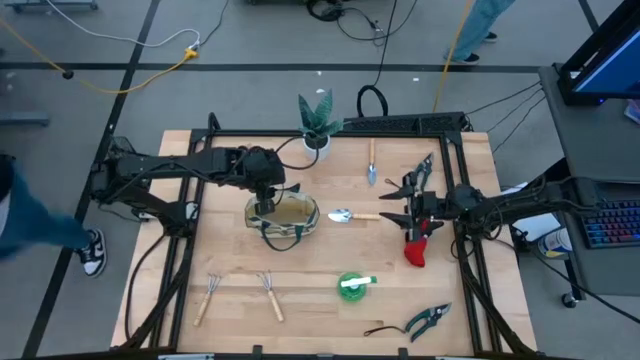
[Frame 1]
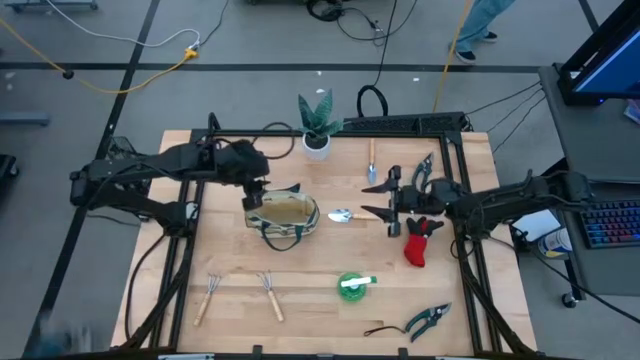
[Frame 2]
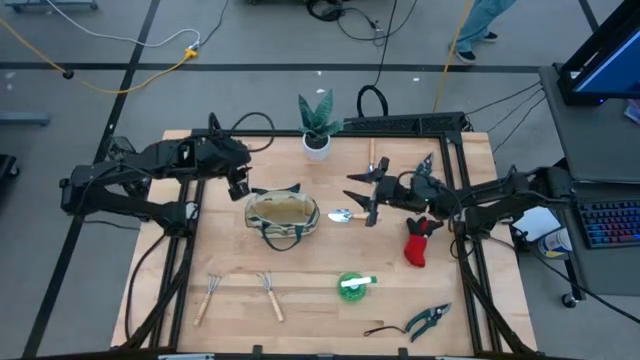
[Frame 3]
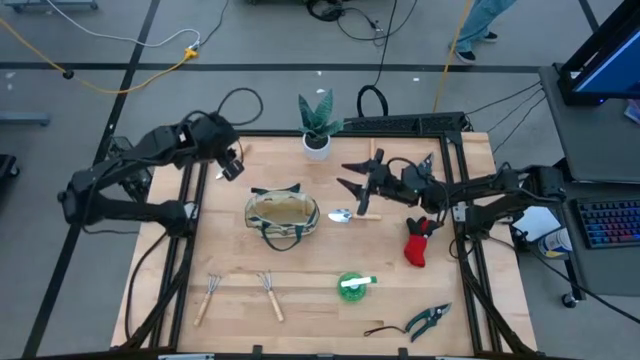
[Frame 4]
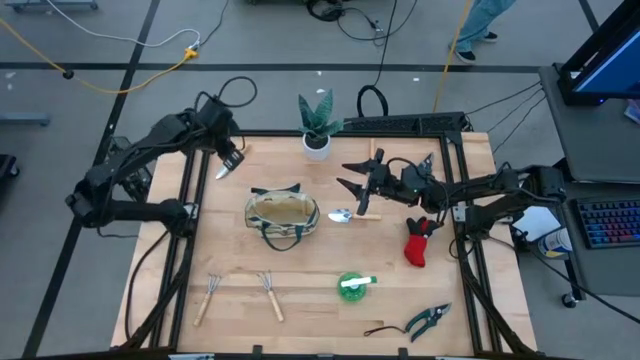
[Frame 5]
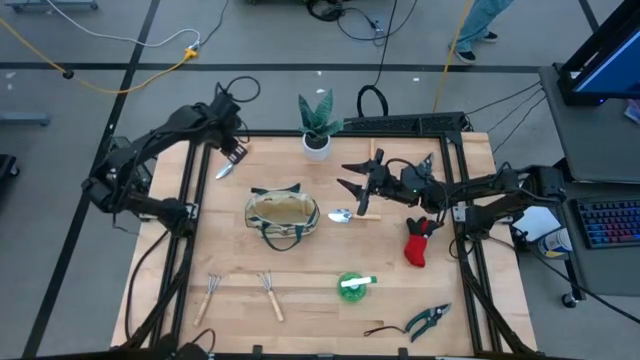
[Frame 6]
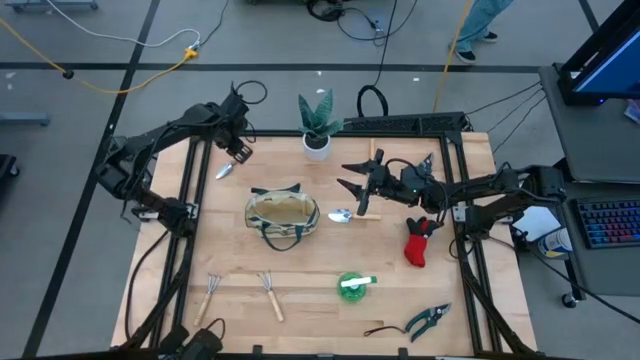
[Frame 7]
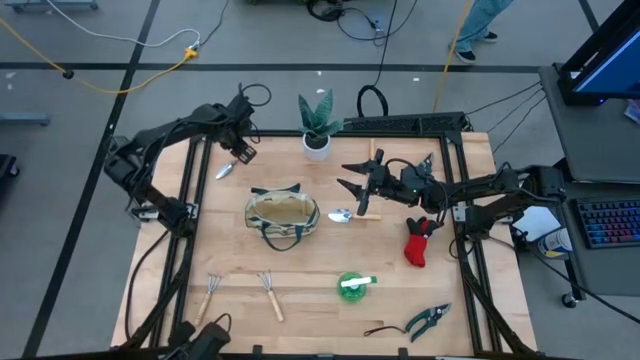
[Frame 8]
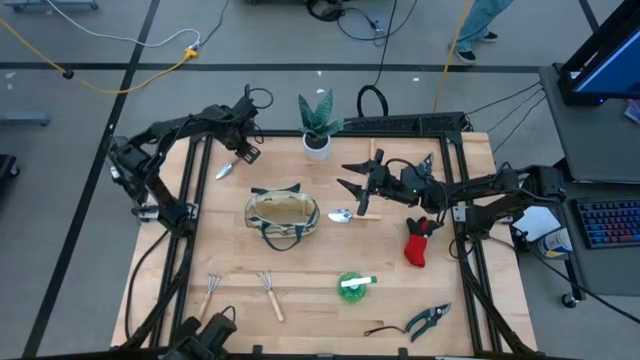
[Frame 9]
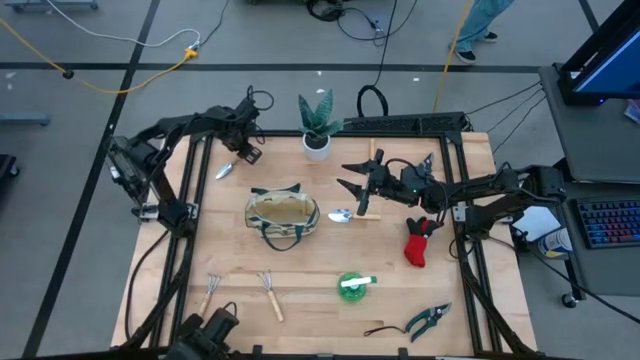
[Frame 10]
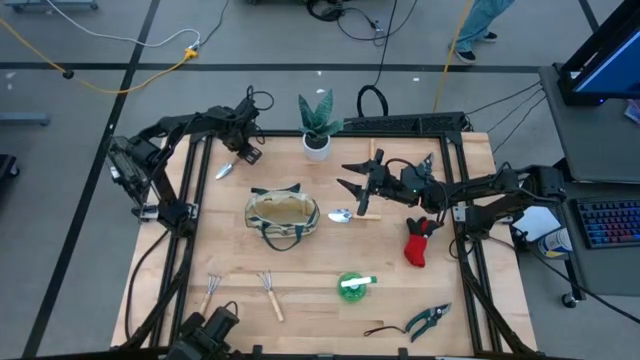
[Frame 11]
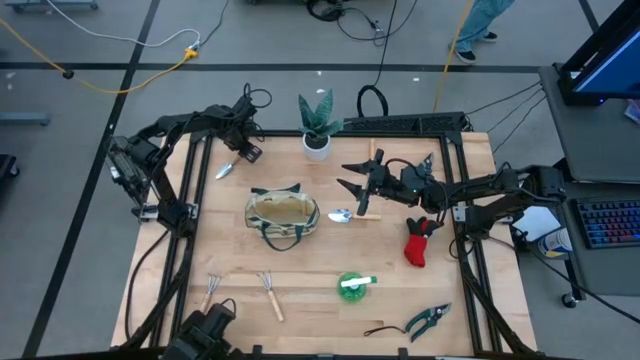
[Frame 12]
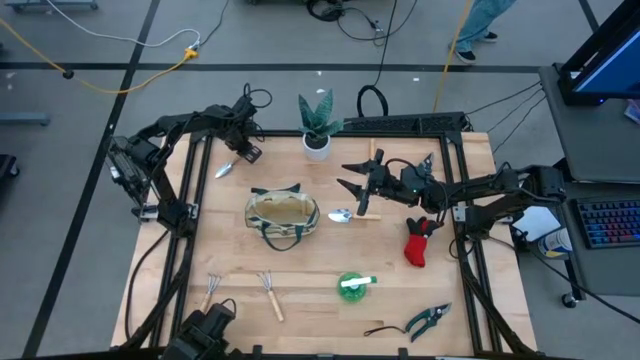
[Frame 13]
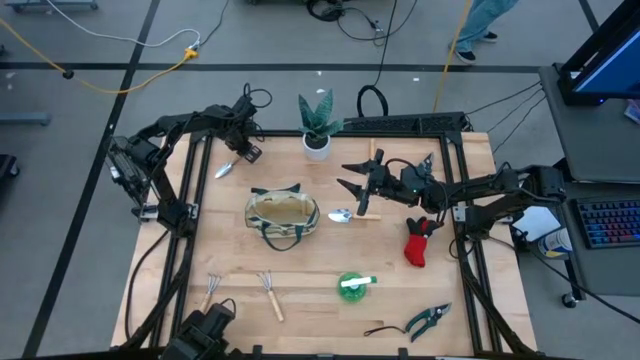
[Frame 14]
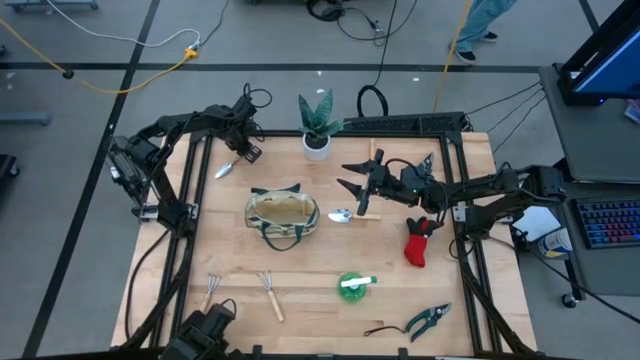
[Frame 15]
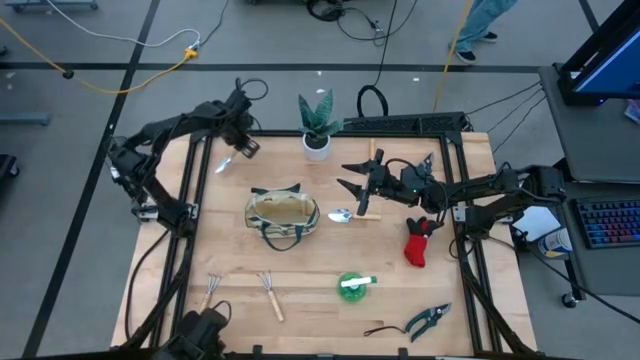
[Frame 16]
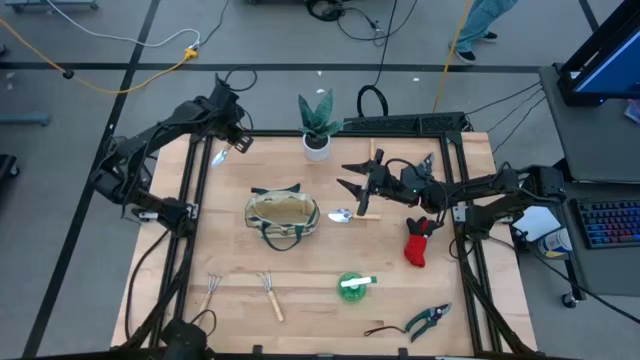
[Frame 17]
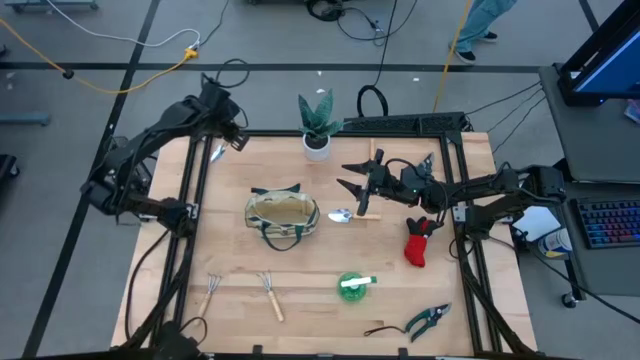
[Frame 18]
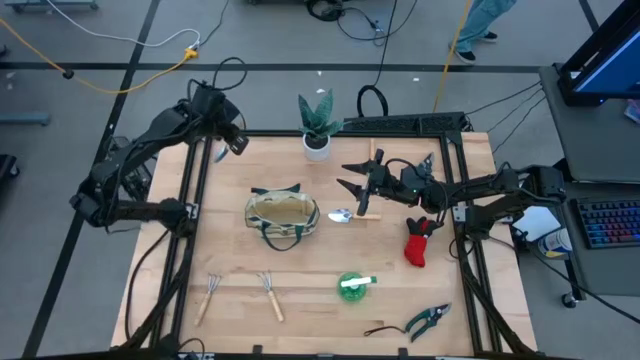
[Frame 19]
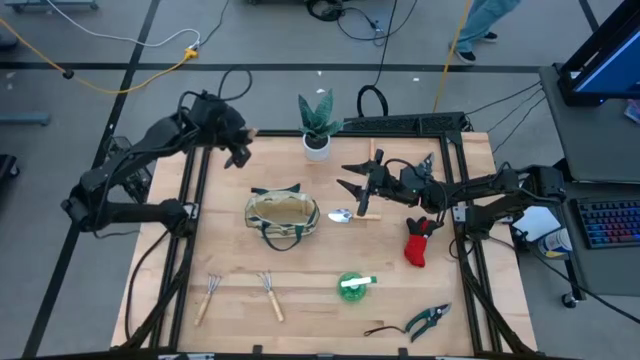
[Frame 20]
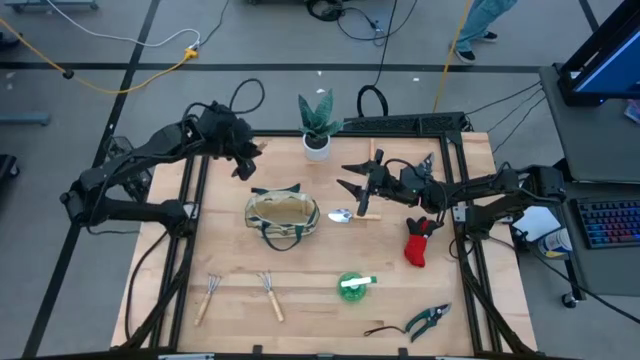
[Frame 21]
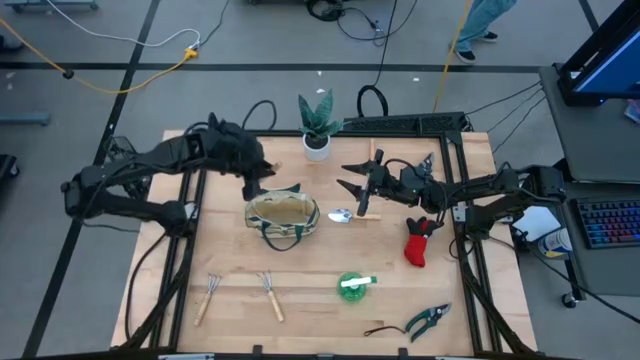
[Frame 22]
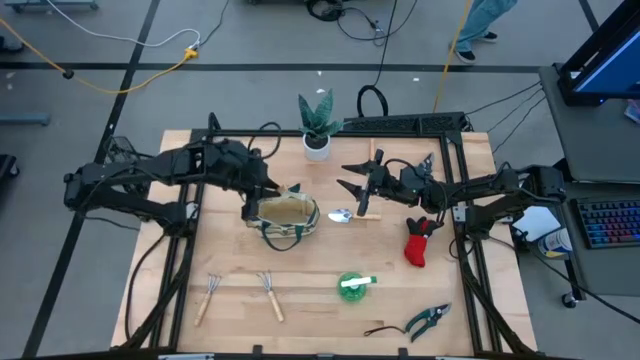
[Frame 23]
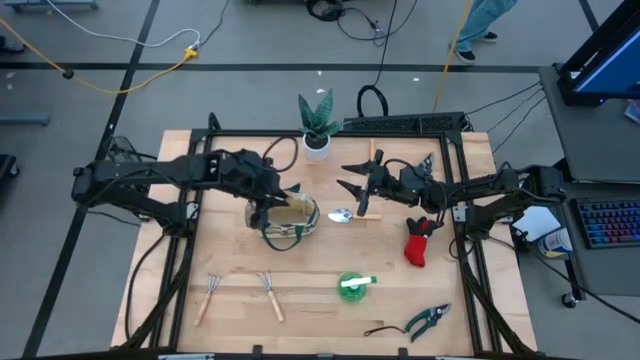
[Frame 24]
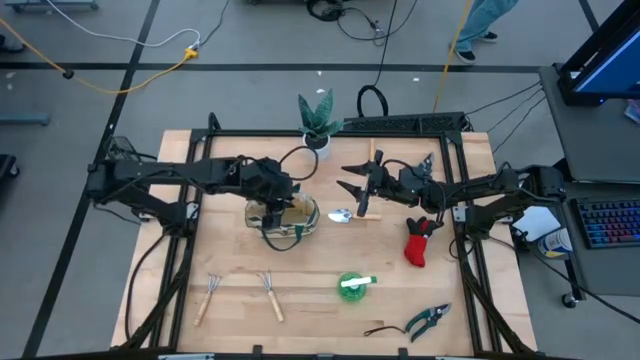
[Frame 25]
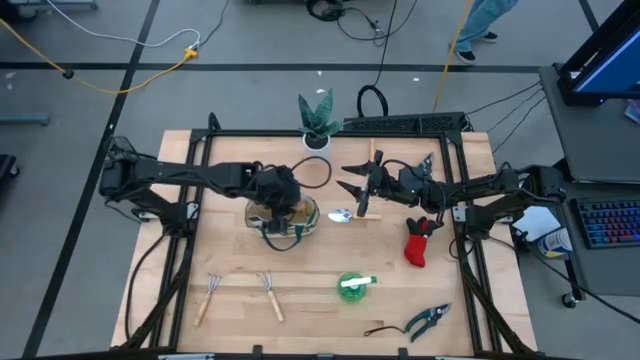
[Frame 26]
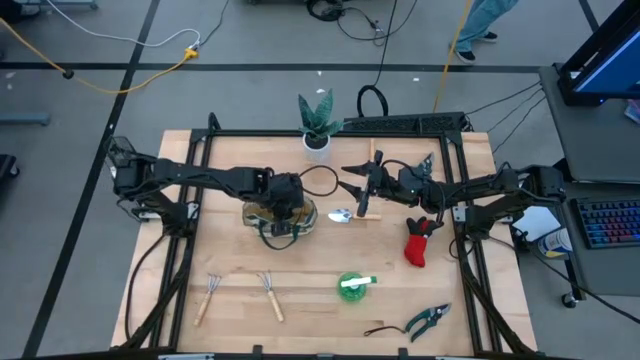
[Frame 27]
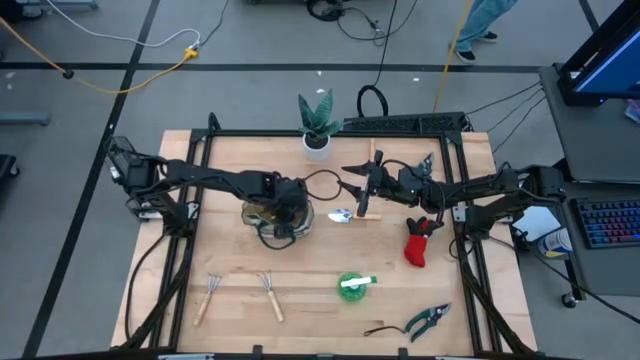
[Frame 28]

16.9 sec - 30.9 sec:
Task: Pick & Place Garden tools in Gardening bag
Put the top left brown trowel into the white gardening bag

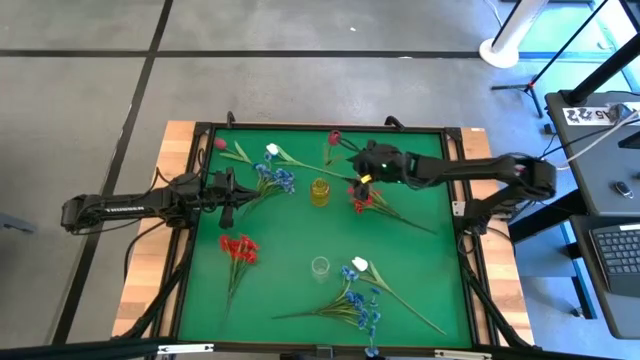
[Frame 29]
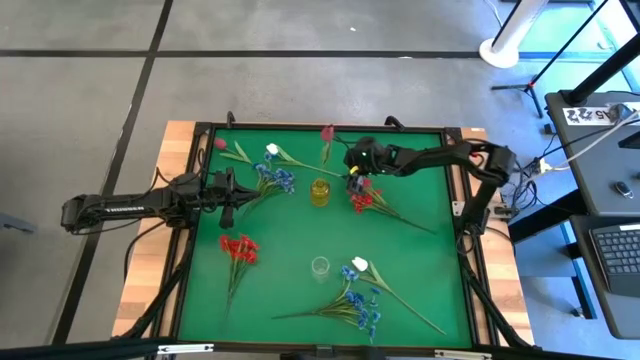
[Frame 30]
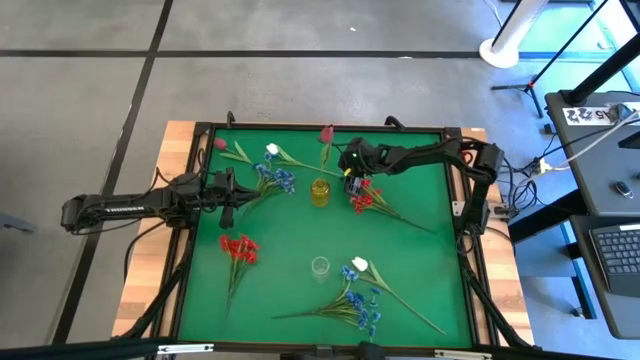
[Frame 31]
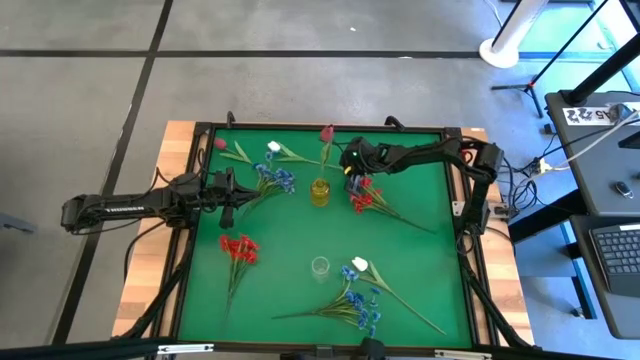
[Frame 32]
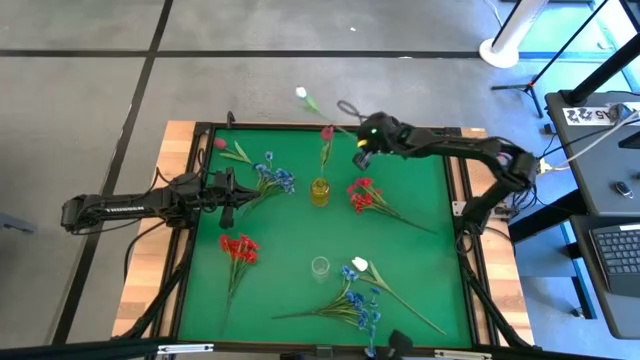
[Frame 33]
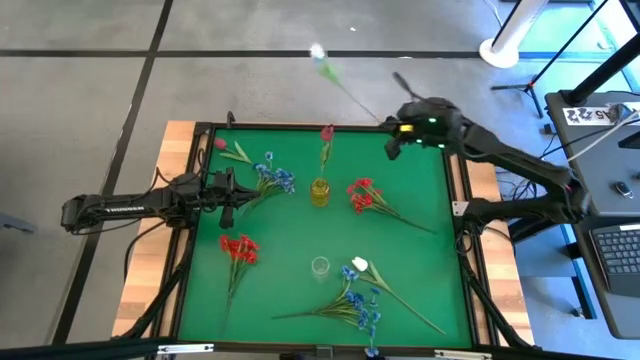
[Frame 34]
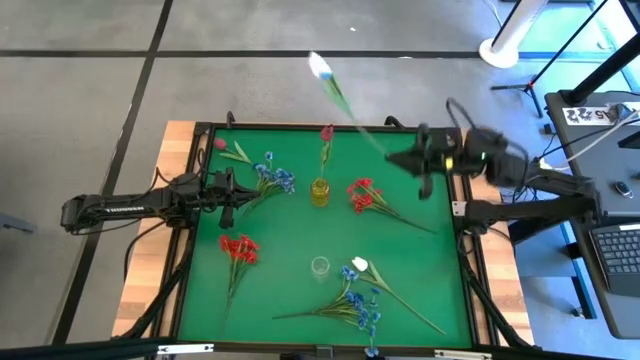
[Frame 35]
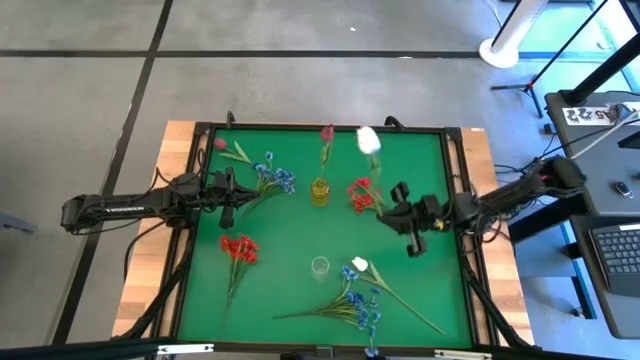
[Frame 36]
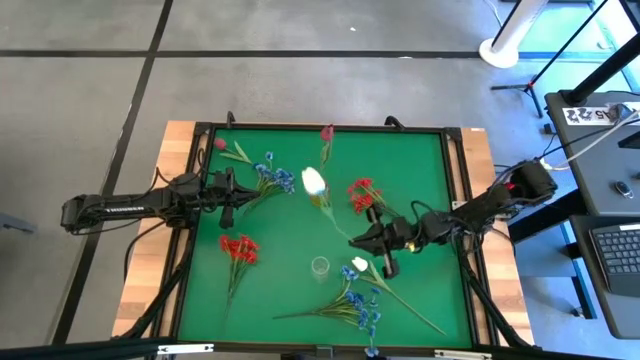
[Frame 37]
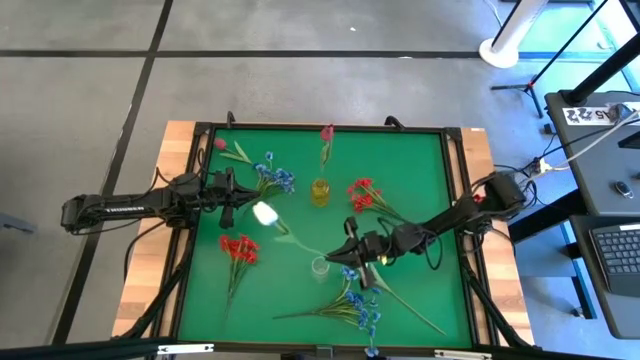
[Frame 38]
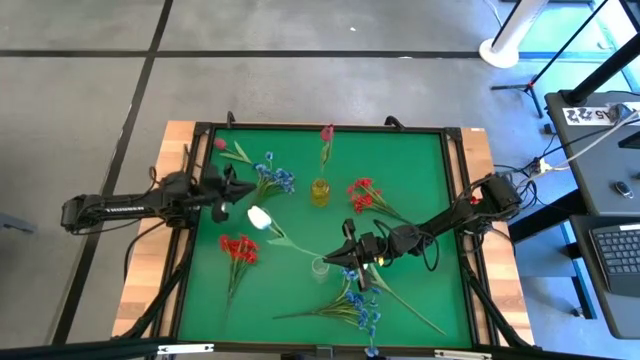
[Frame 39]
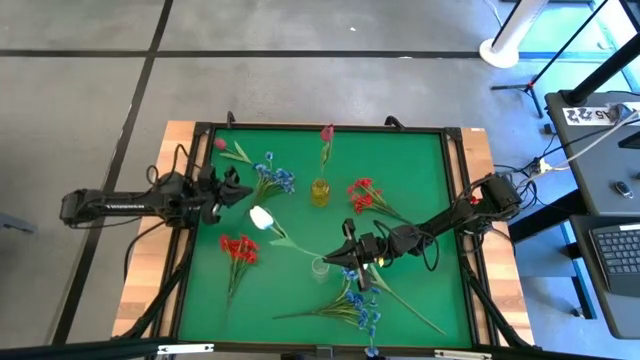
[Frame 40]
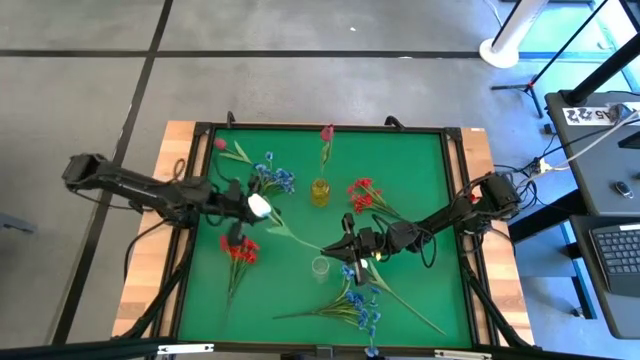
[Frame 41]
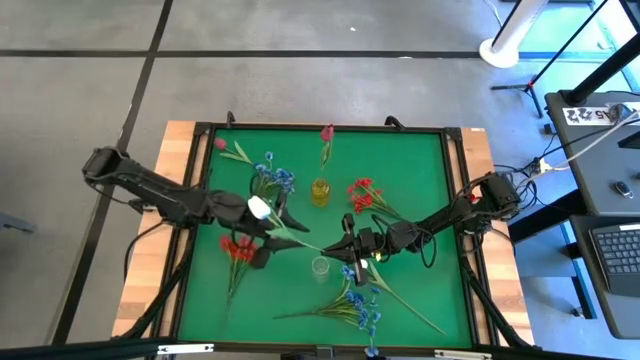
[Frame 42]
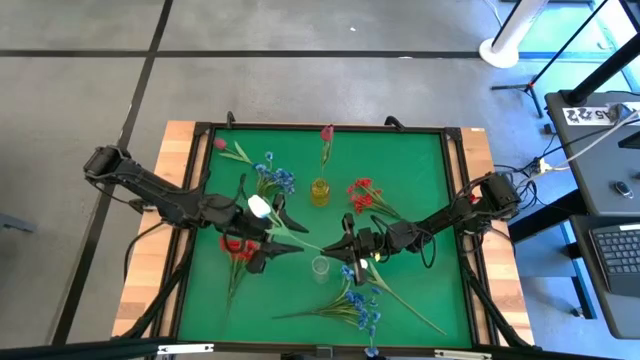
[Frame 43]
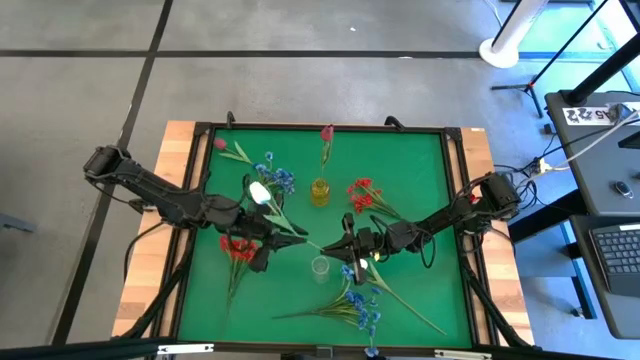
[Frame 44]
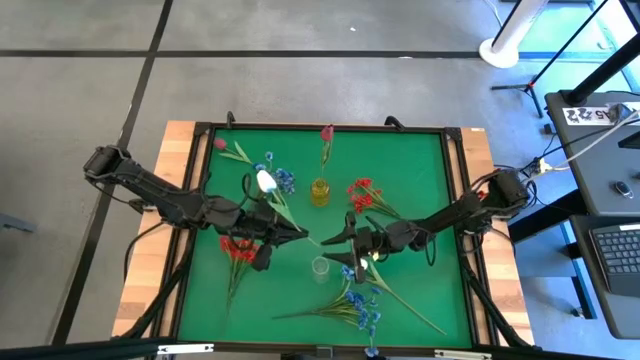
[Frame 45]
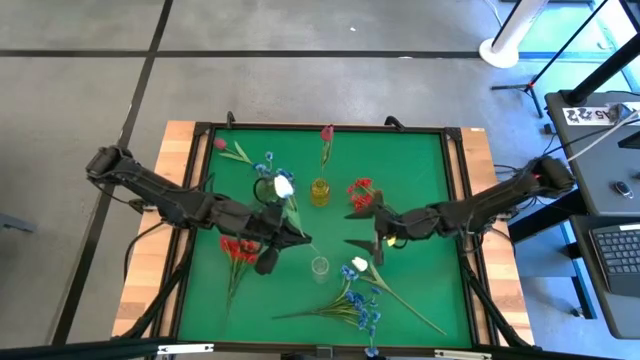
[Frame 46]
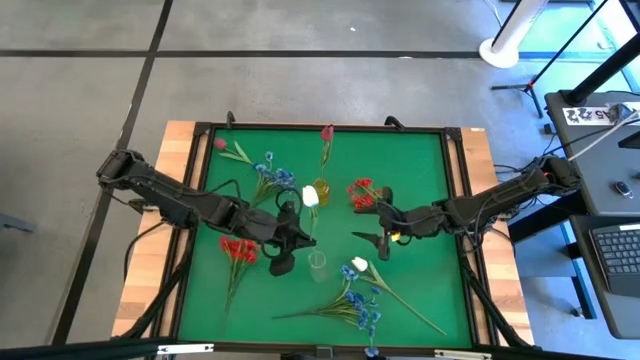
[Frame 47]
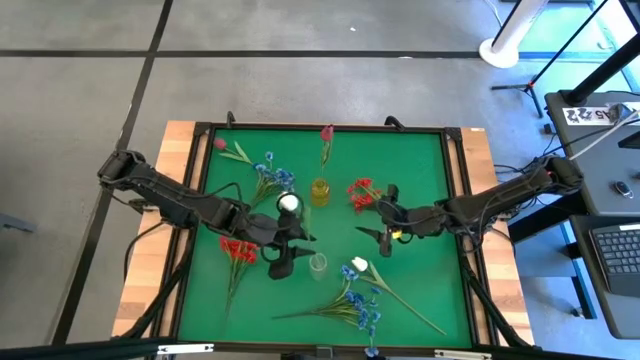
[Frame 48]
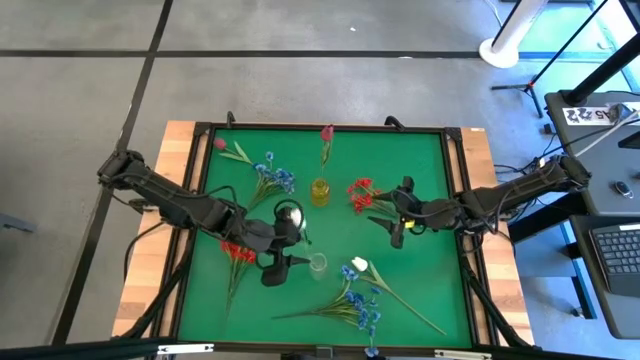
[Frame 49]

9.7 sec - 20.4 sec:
Task: Sort flowers into vase by color
Put the top white tulip into the transparent flower vase
